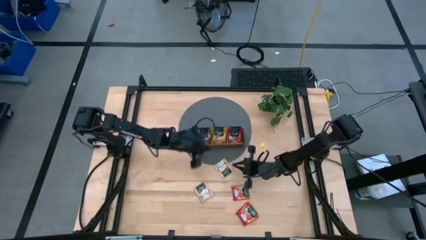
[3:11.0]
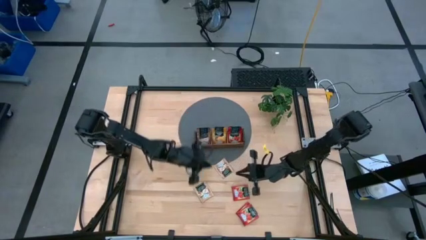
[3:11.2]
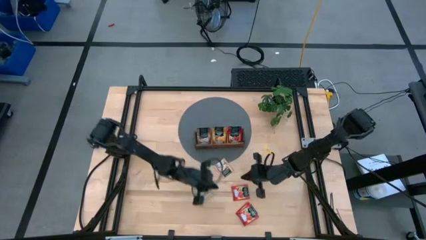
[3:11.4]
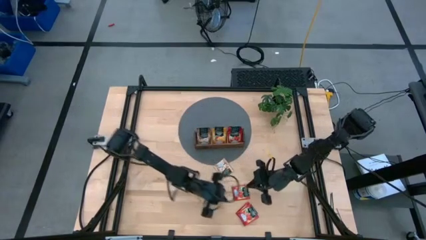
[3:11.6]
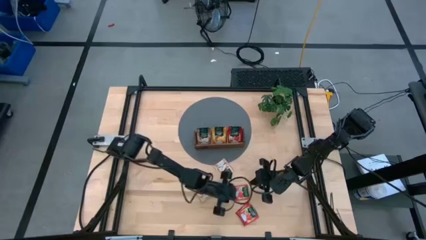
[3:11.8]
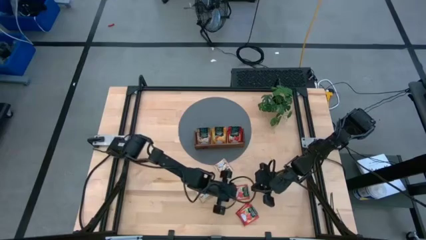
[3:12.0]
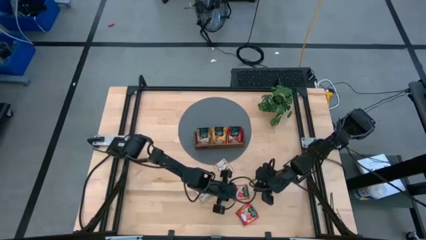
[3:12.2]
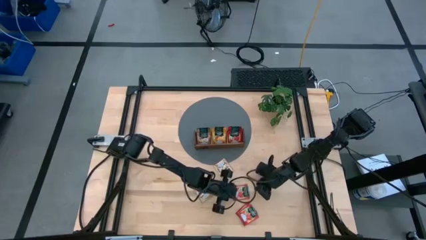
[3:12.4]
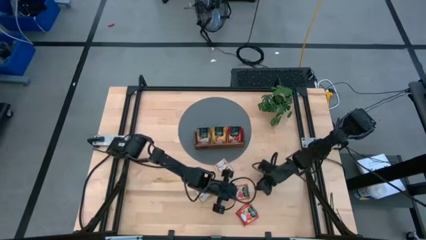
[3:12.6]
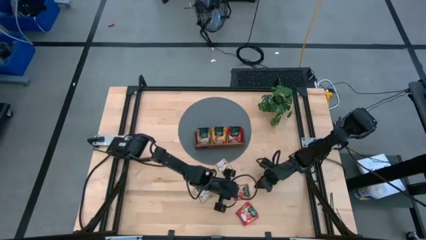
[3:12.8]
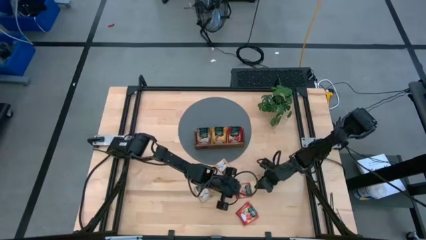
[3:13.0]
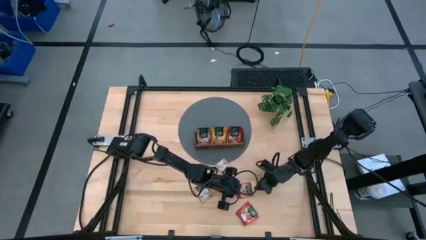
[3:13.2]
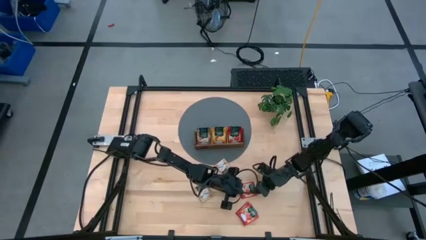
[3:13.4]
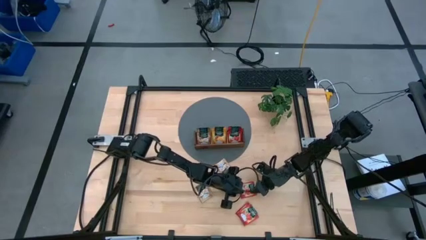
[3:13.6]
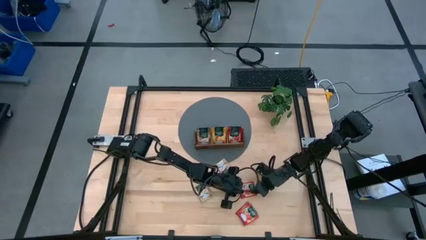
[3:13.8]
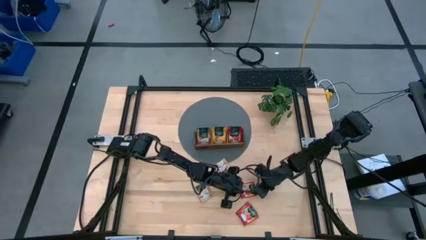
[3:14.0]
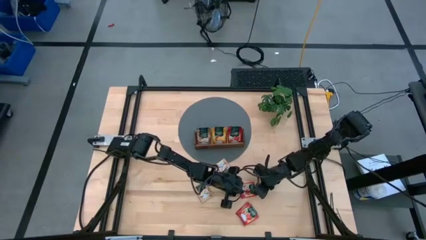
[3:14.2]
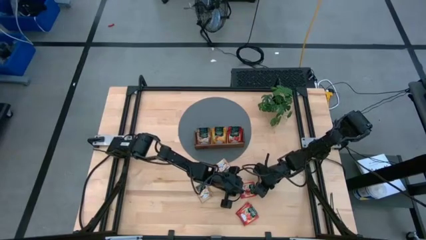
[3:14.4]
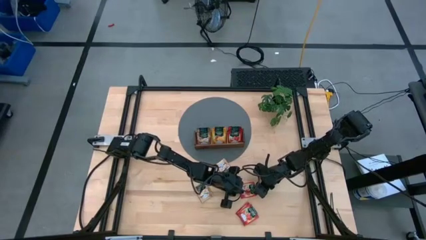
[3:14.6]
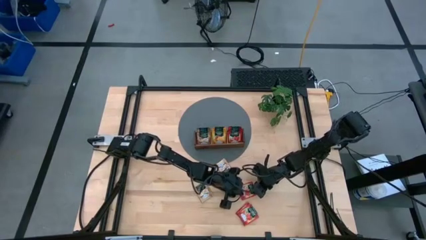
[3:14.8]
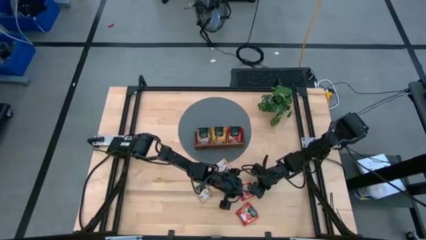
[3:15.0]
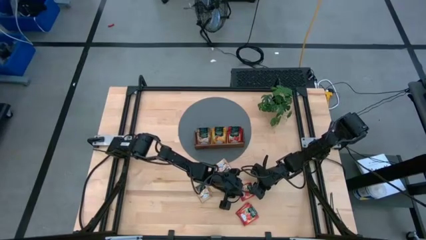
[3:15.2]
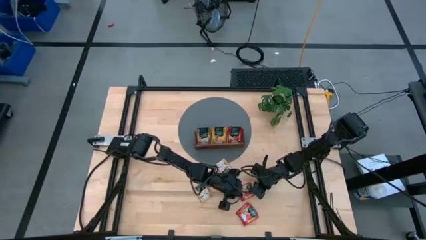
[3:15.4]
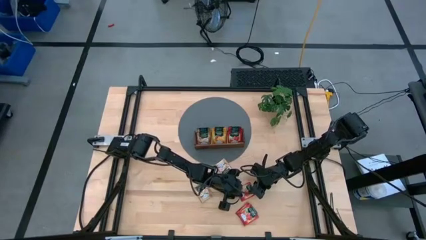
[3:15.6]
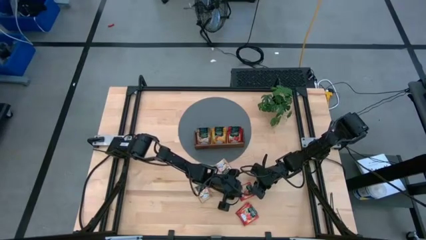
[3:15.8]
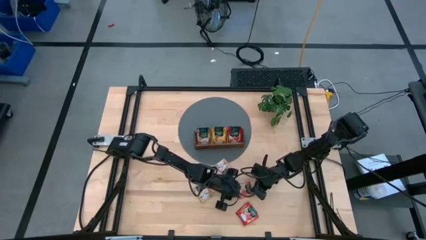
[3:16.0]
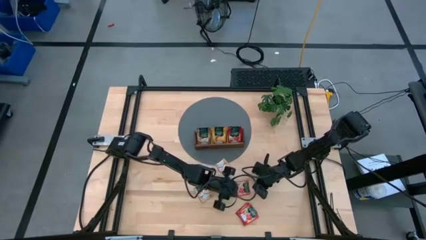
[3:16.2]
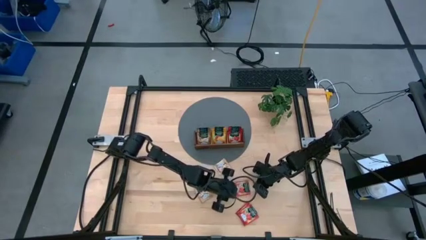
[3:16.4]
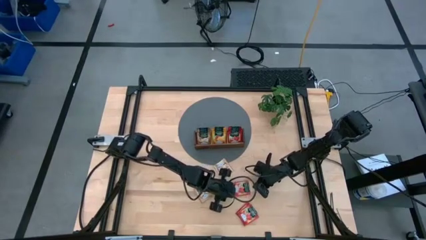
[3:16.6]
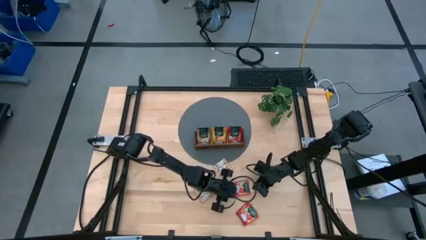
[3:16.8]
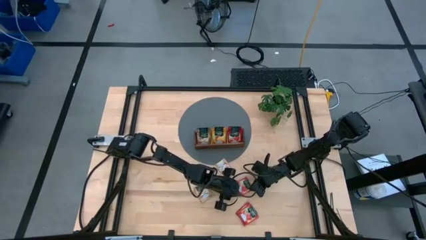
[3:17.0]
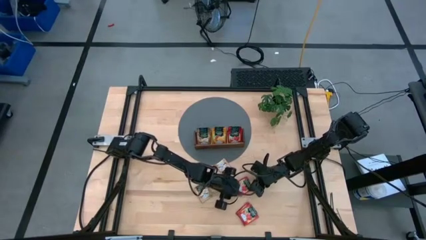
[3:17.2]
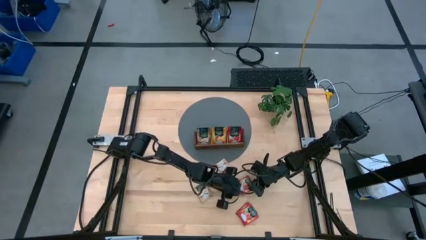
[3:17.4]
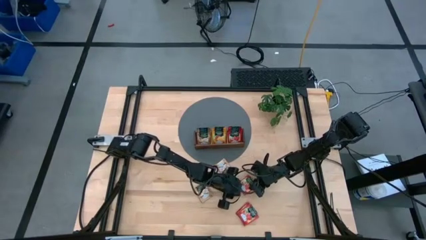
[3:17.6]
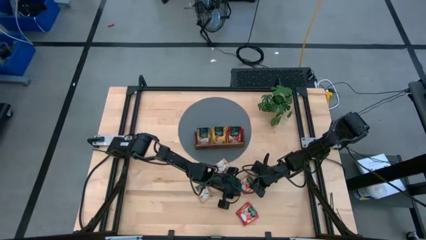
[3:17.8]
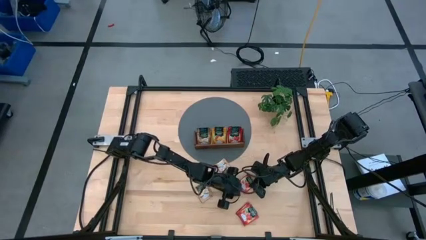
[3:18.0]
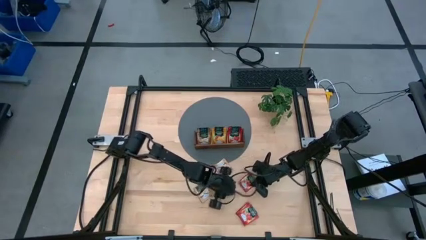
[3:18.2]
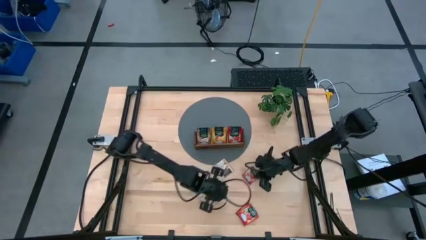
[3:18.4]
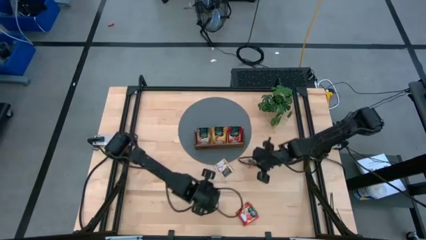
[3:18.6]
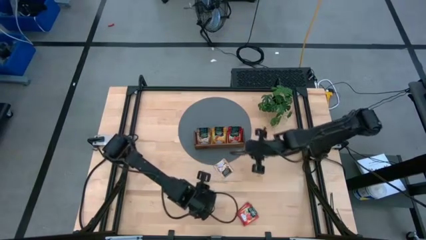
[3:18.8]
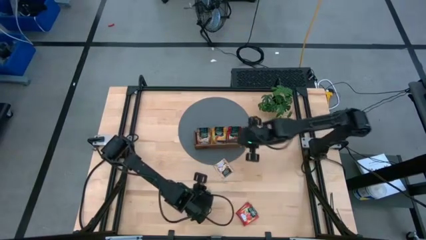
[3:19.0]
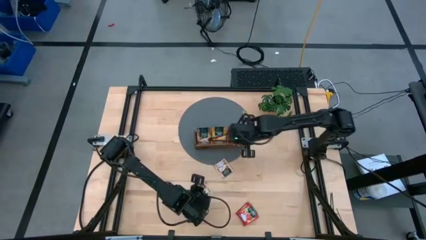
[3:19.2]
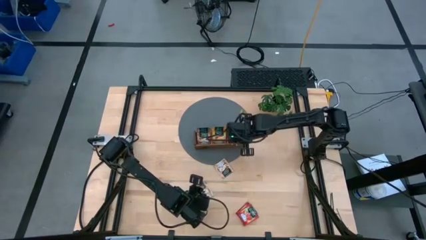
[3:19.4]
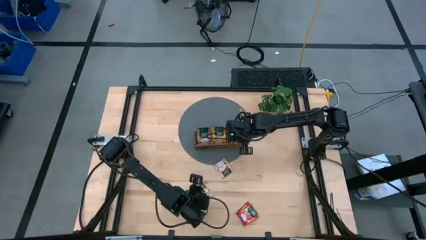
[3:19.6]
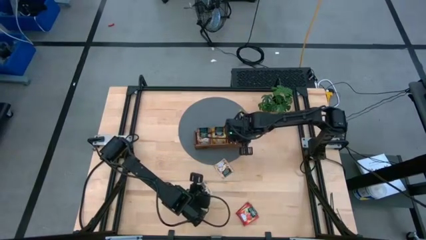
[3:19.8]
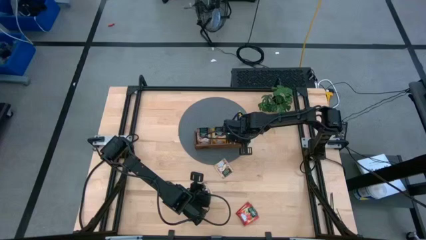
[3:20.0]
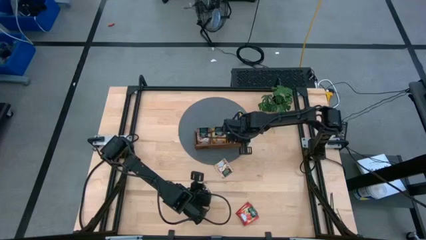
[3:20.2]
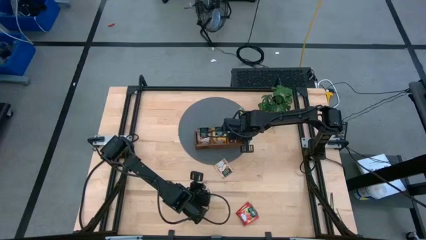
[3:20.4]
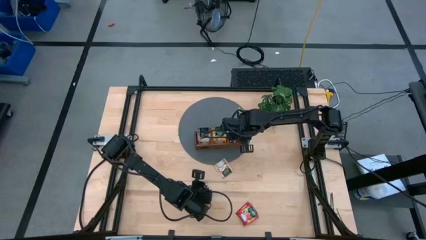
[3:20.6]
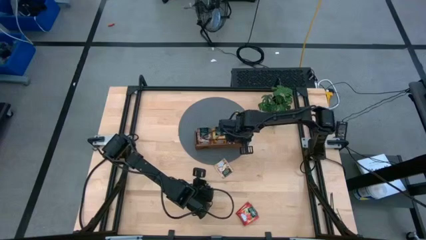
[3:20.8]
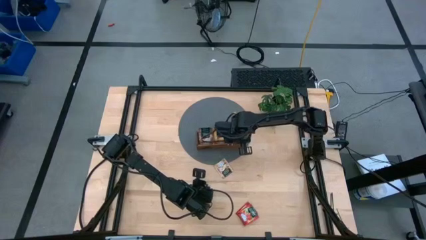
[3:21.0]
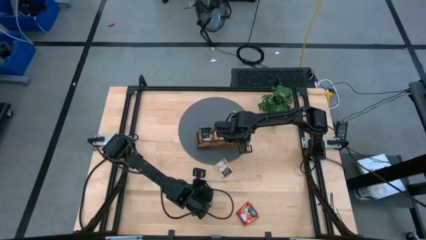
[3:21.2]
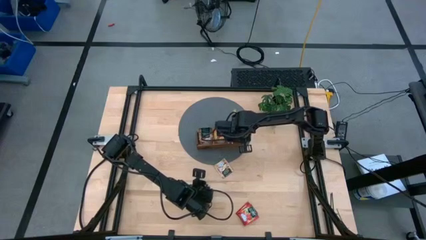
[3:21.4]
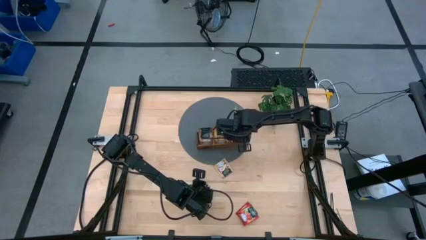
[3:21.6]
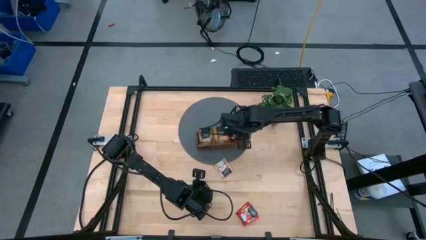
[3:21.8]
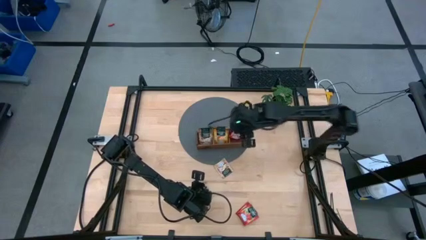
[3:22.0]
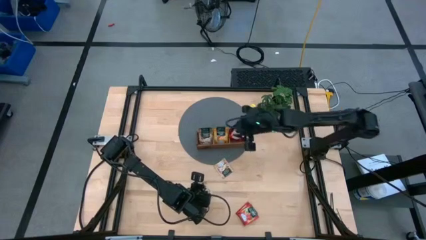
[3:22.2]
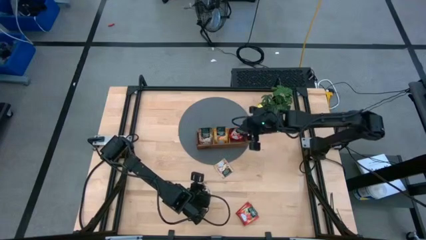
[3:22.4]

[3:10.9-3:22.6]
Task: Pick & Place Tea
Put the red tea bag into the right section of the wooden organizer

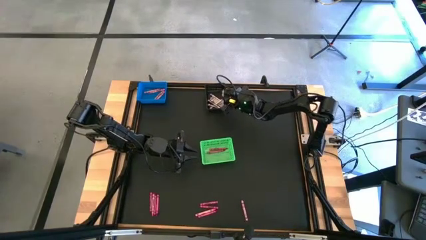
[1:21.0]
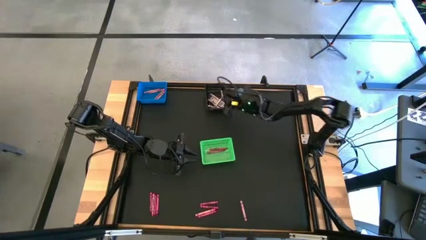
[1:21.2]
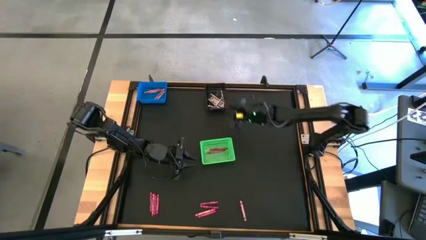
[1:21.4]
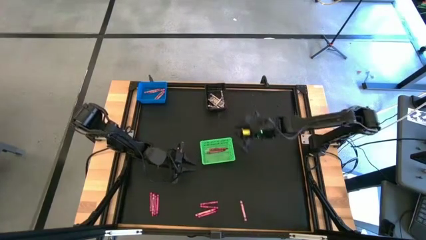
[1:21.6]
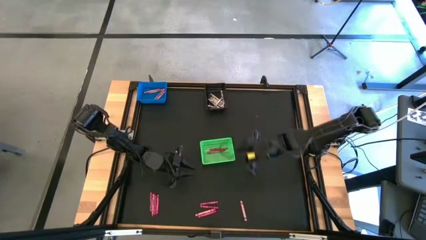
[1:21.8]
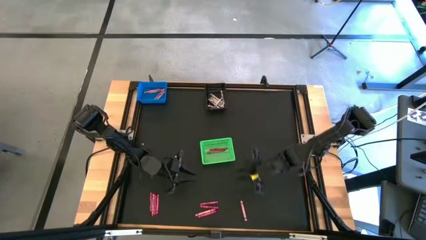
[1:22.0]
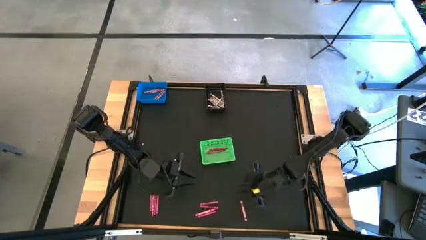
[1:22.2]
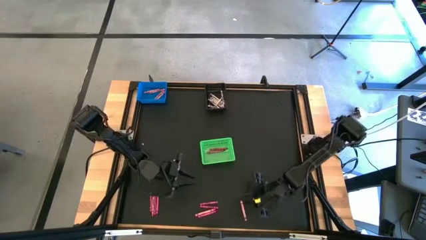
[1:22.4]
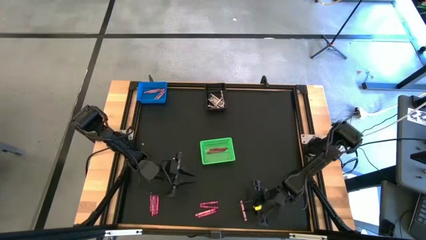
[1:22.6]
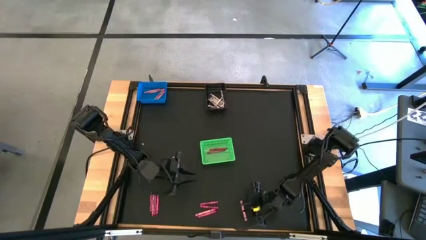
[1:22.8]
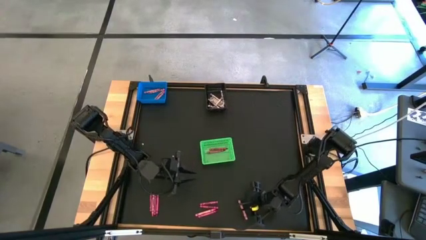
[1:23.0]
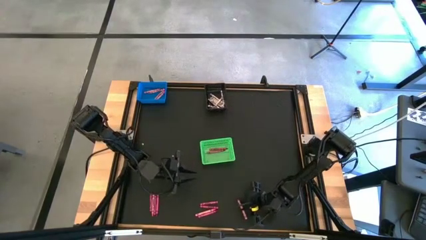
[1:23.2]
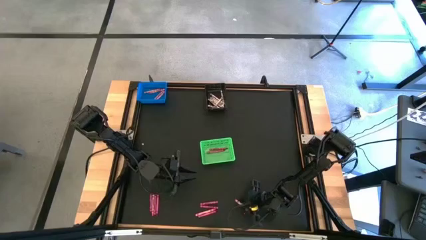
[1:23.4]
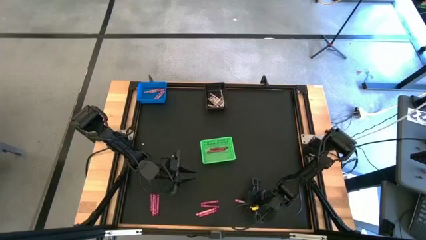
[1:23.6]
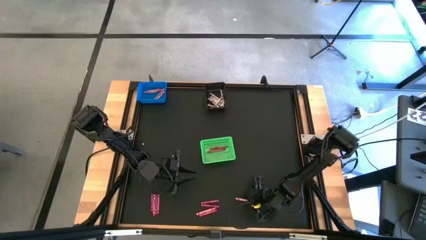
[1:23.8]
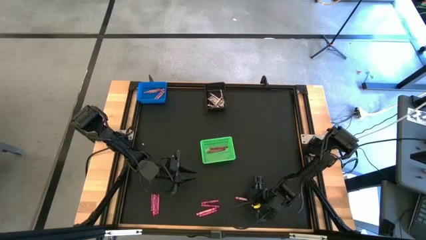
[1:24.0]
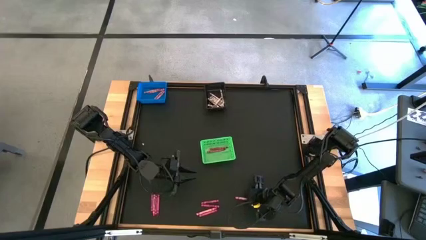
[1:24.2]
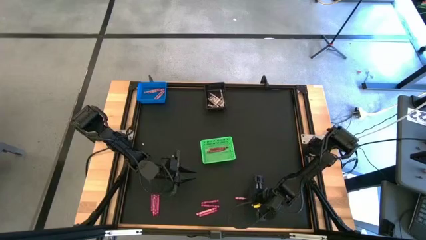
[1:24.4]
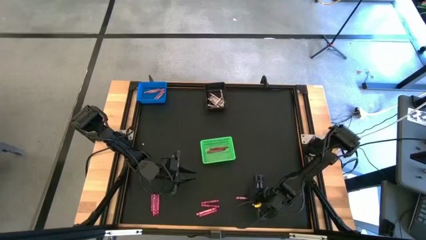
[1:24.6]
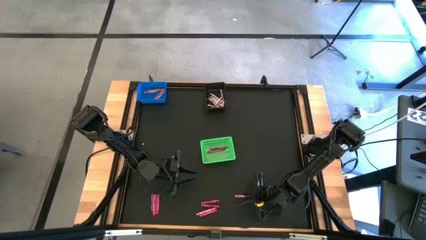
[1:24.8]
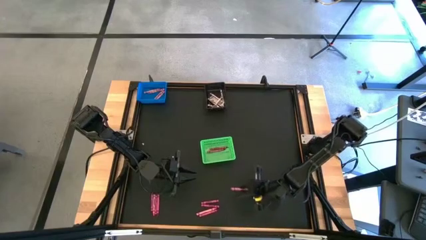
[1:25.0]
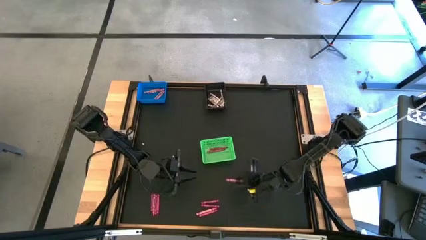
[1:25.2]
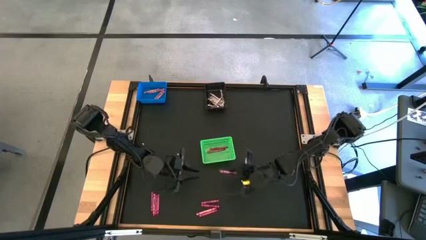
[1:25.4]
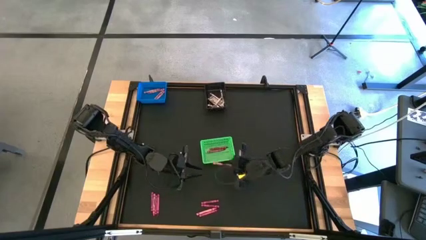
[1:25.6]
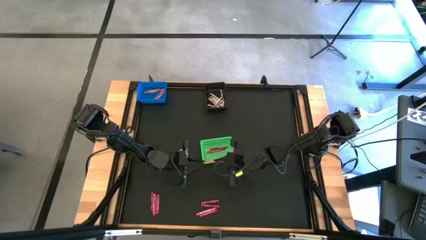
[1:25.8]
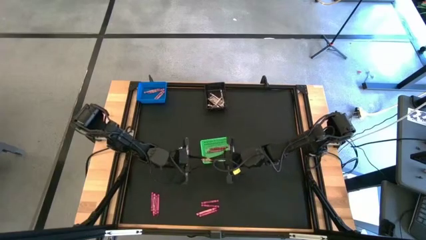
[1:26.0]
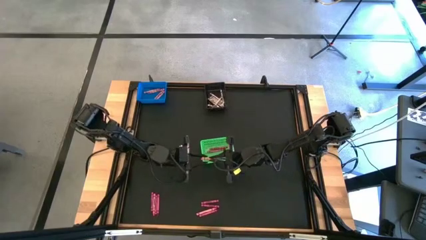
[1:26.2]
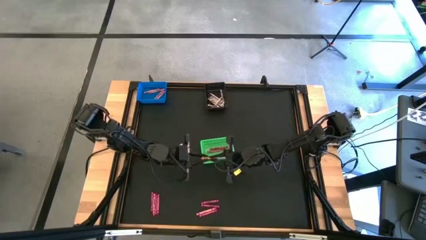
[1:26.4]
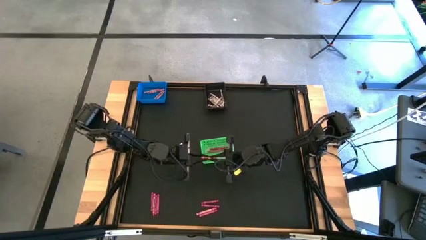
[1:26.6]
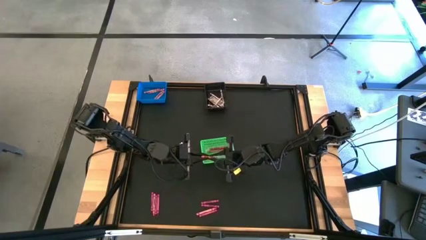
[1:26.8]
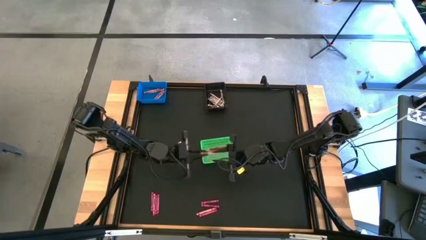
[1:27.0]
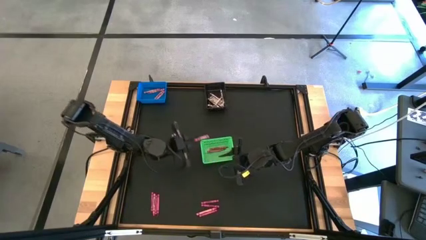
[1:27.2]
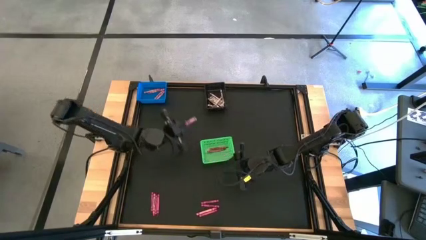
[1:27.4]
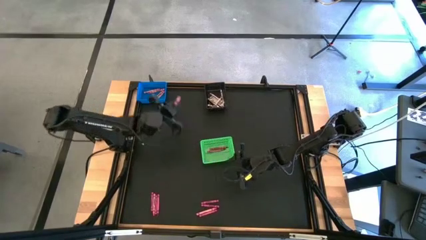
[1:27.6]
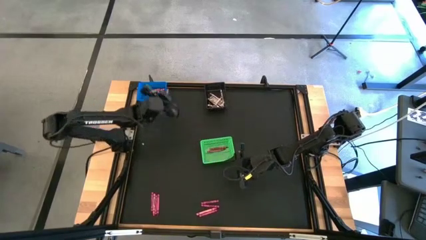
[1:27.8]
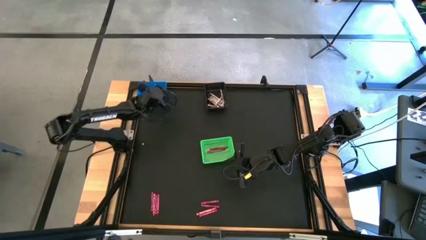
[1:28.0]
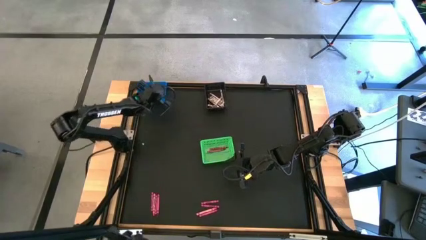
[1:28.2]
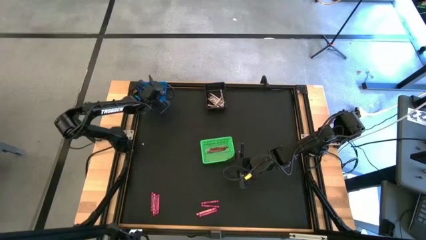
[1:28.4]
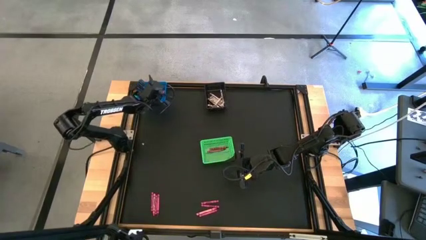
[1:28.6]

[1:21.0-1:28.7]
Task: Sort crayons
Put the pink crayon into the blue bin
